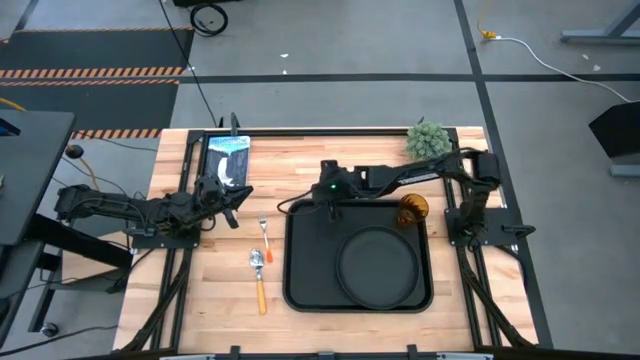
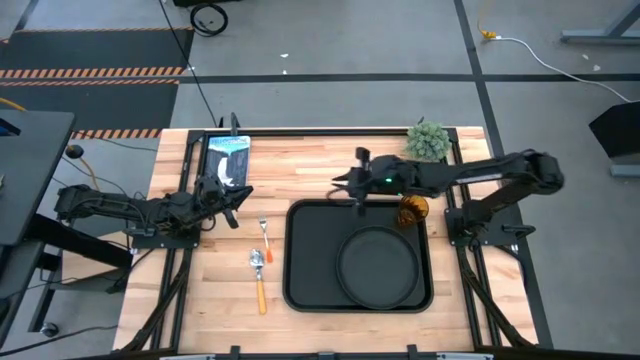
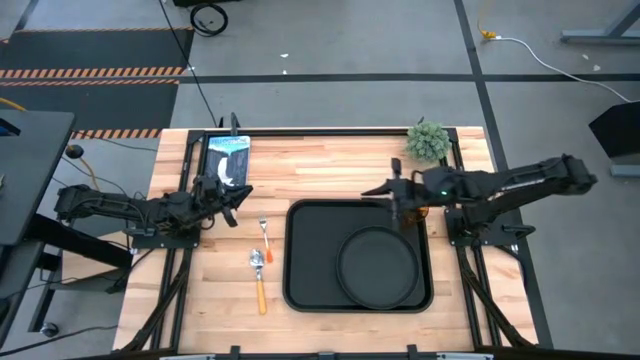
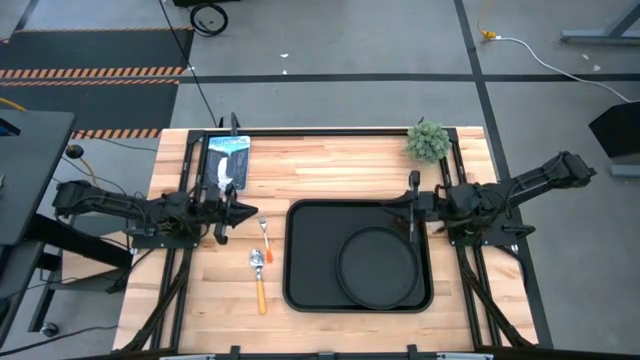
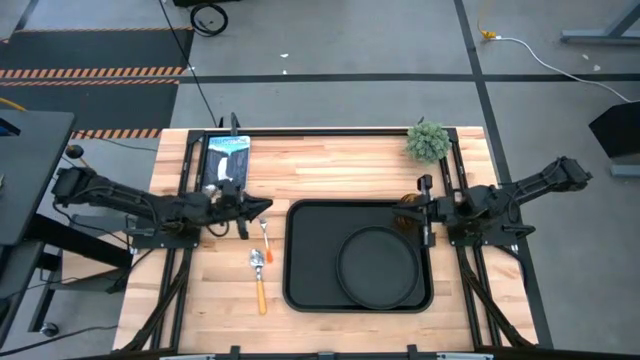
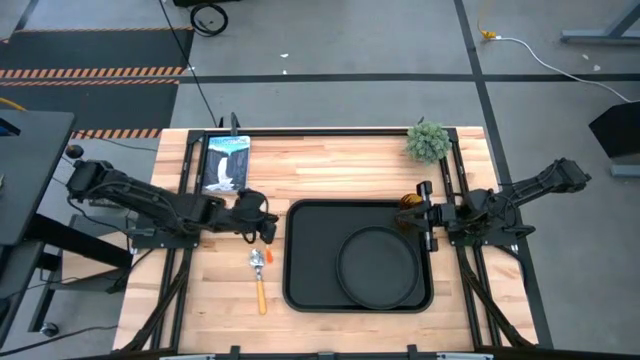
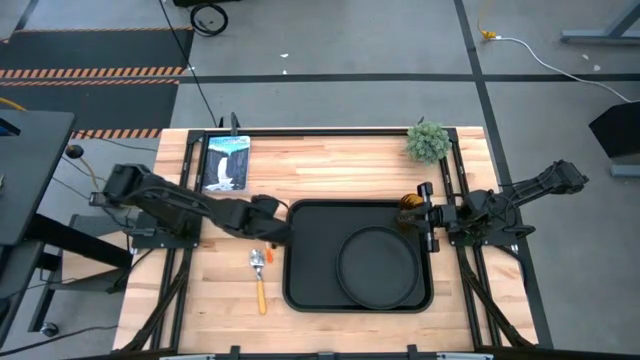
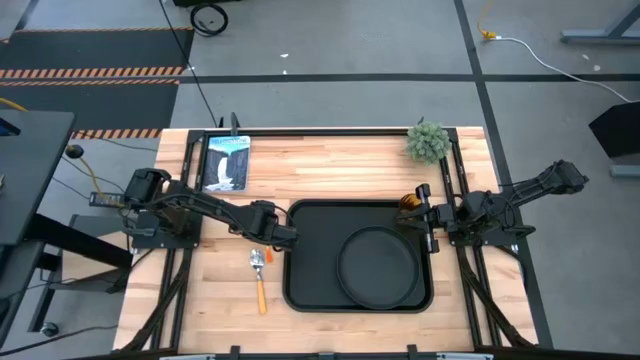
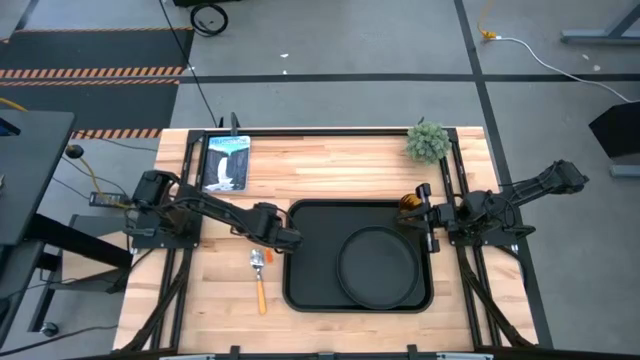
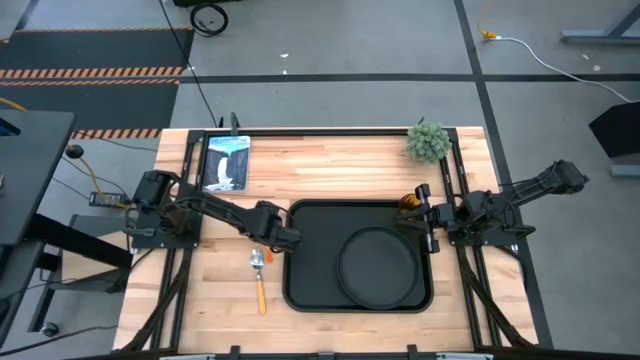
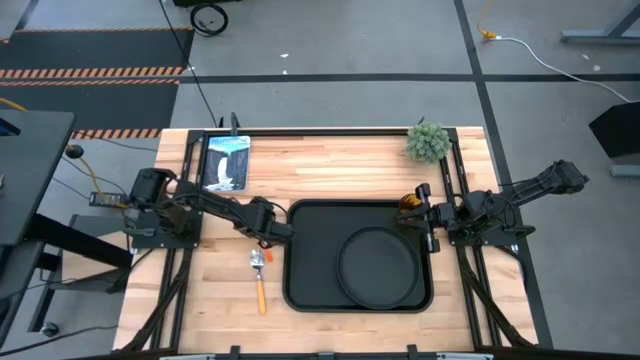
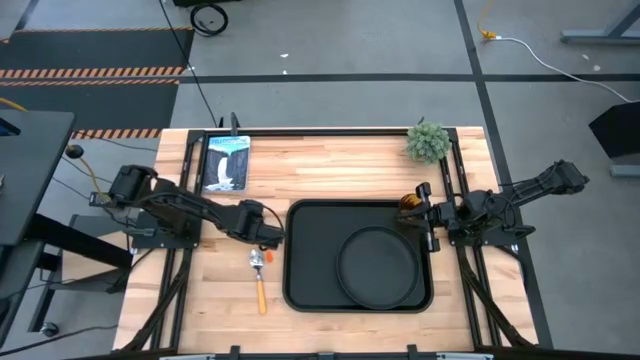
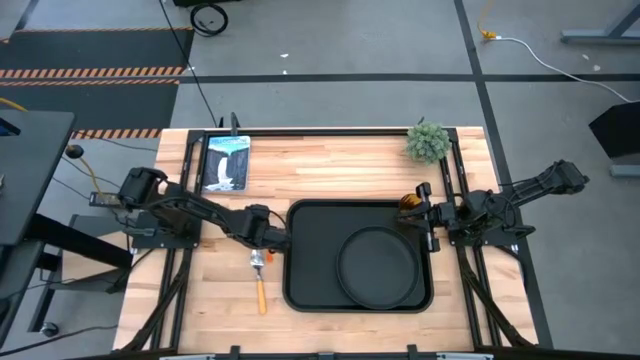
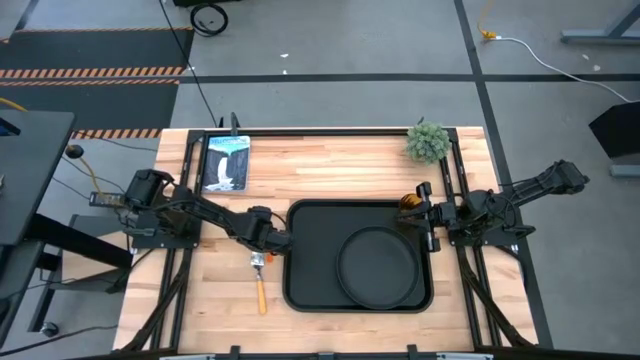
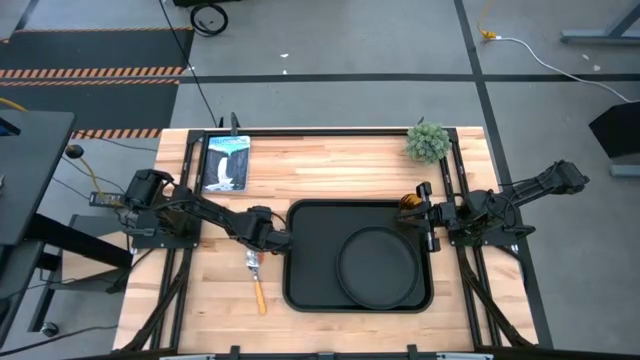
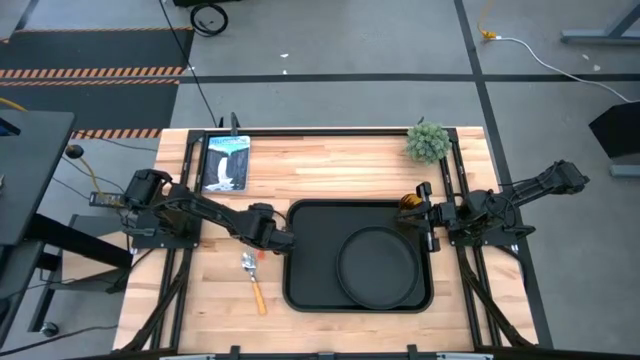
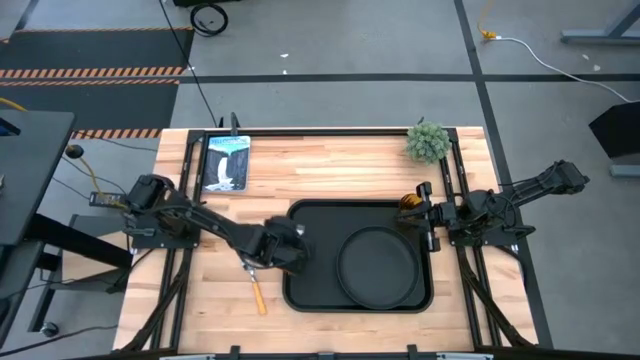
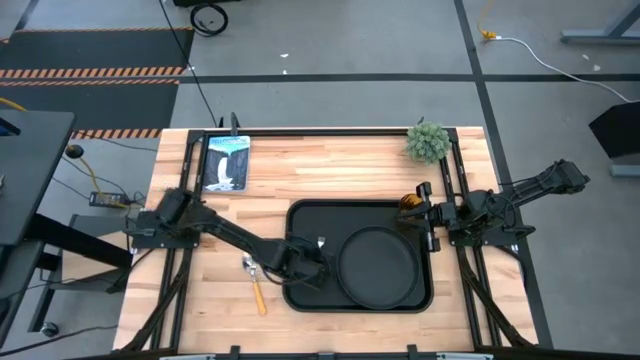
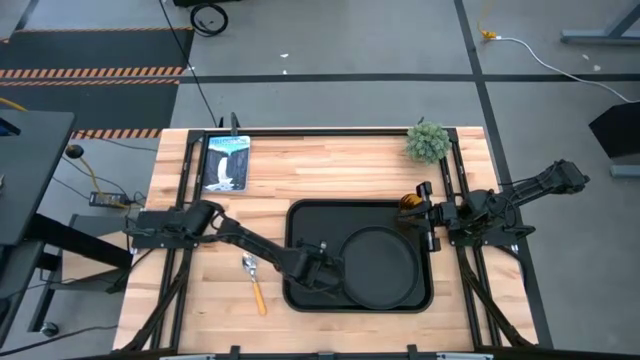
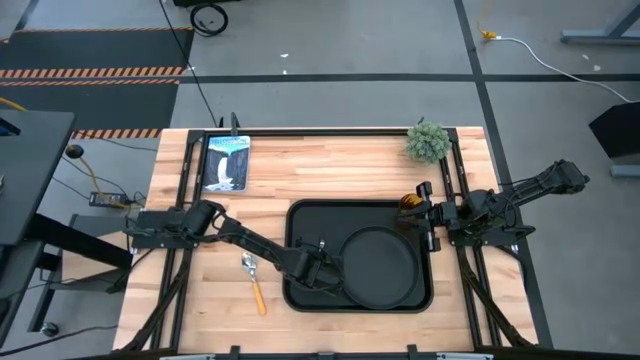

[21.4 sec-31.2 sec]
Task: Pick and place plate/cup/fork/spoon on tray
Put the orange fork to the left of the black plate on the black tray

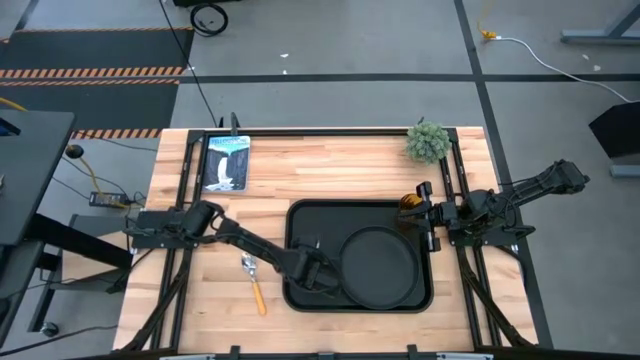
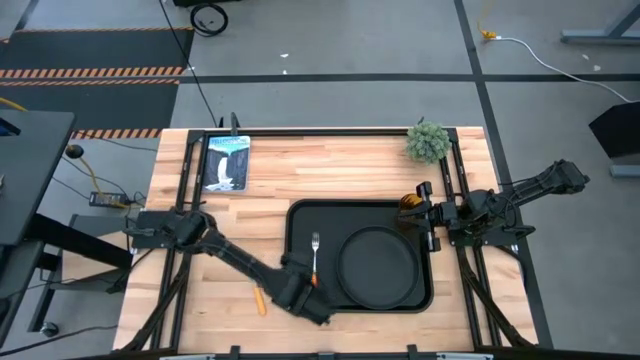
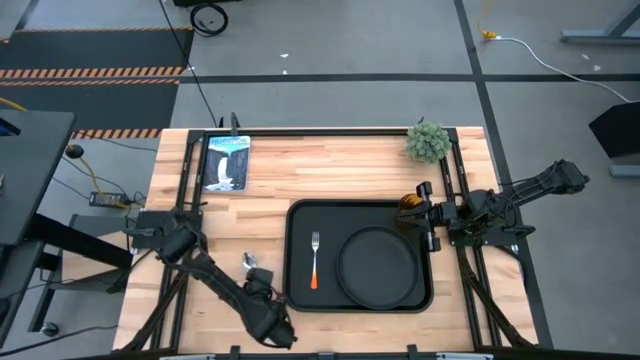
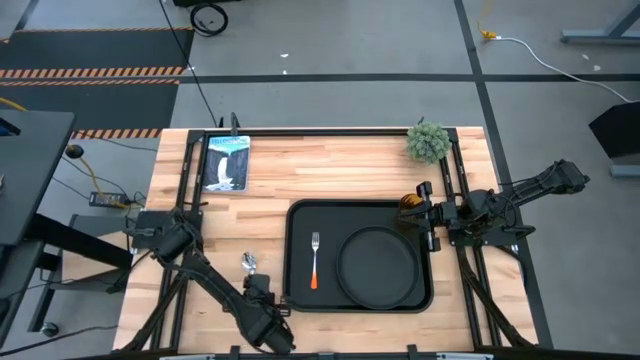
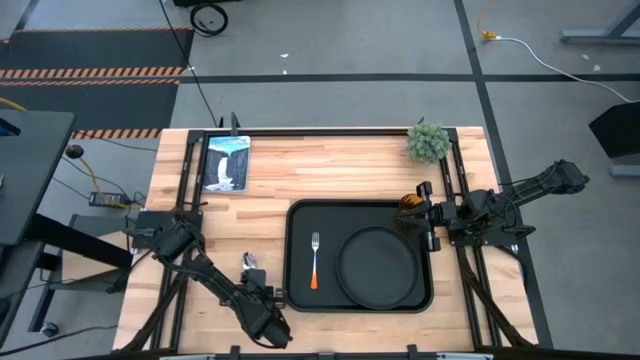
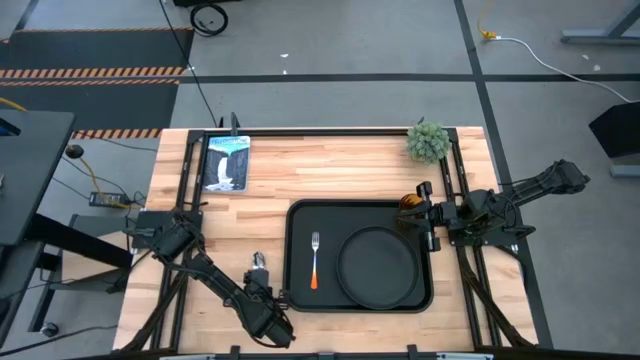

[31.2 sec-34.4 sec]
Put the yellow spoon to the left of the orange fork on the black tray

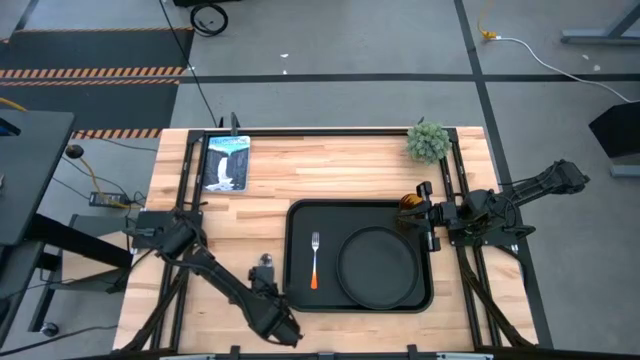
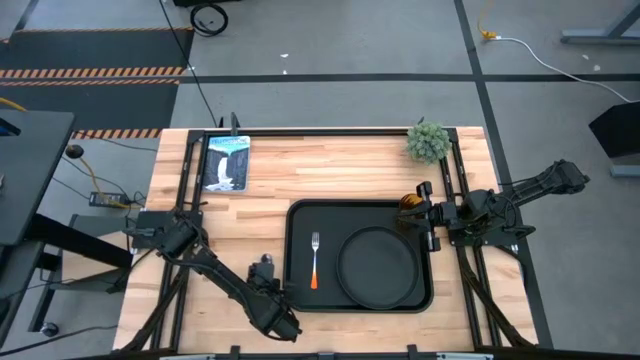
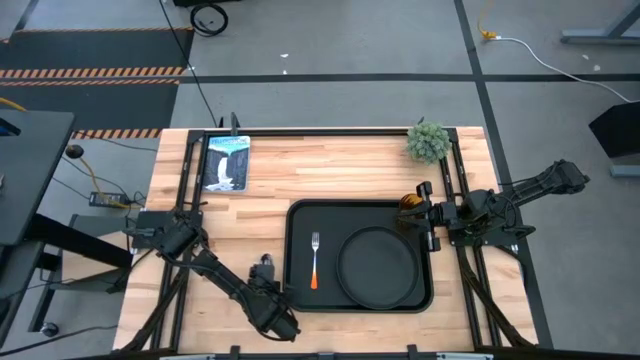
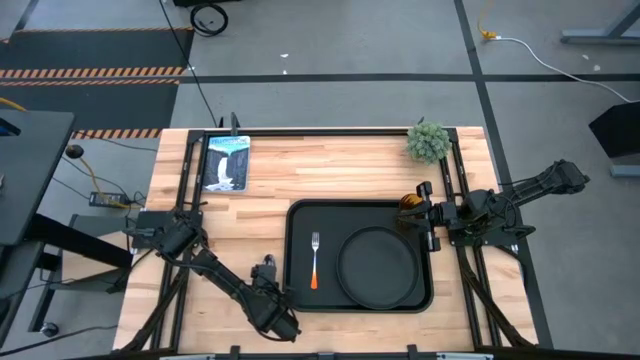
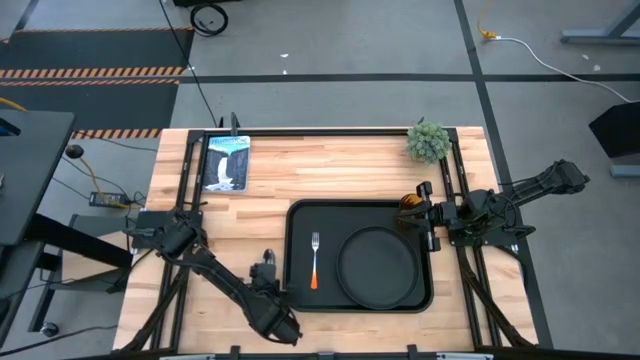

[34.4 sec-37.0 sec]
Put the yellow spoon to the left of the orange fork on the black tray

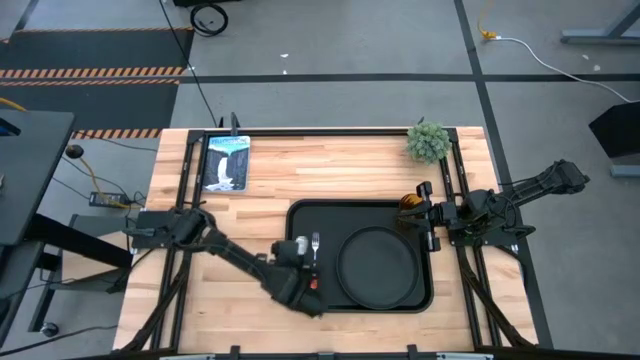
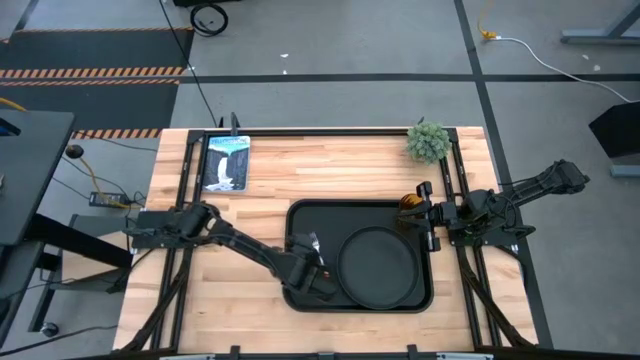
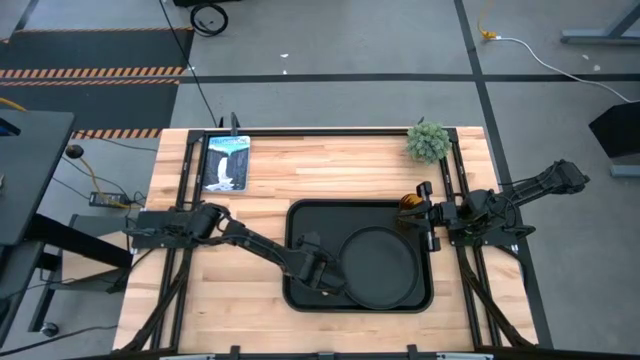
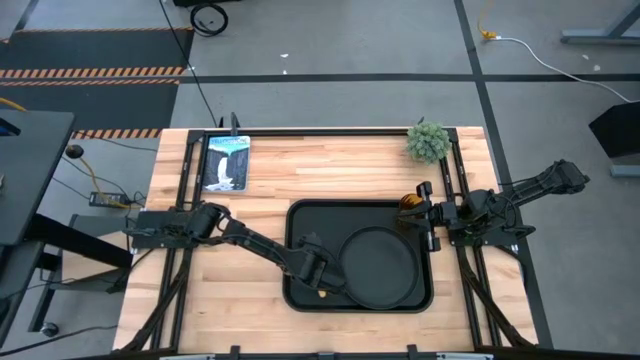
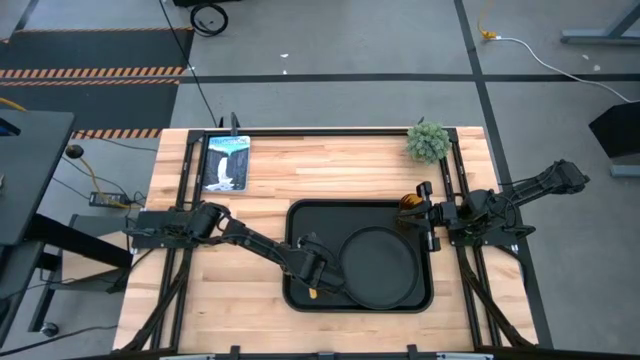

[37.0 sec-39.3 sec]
Adjust the yellow spoon on the black tray

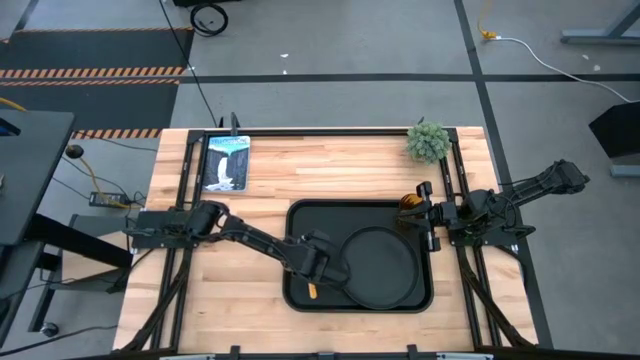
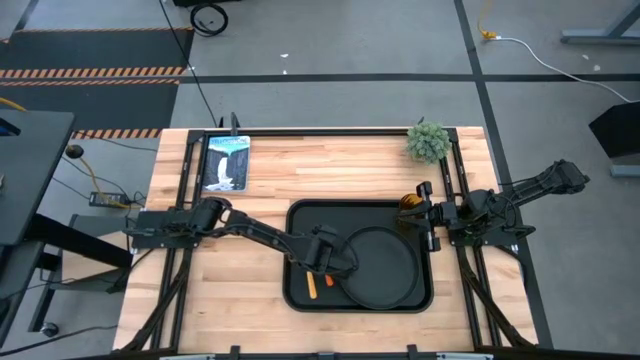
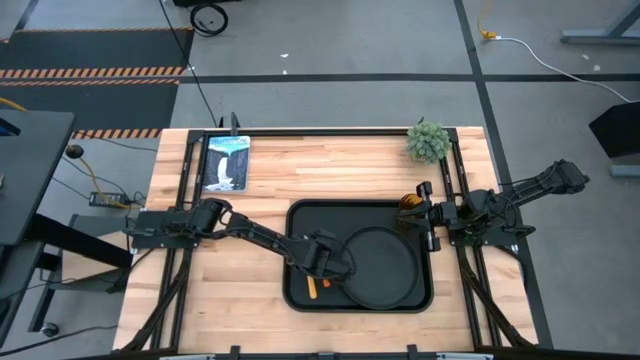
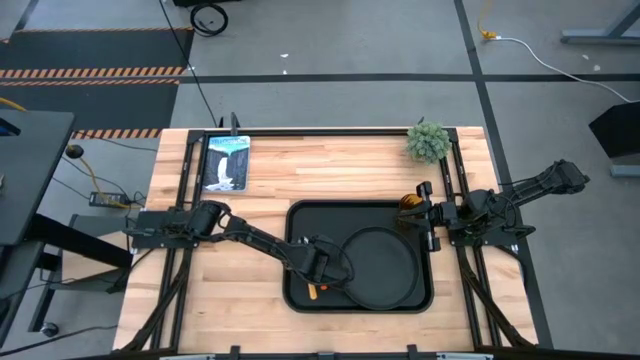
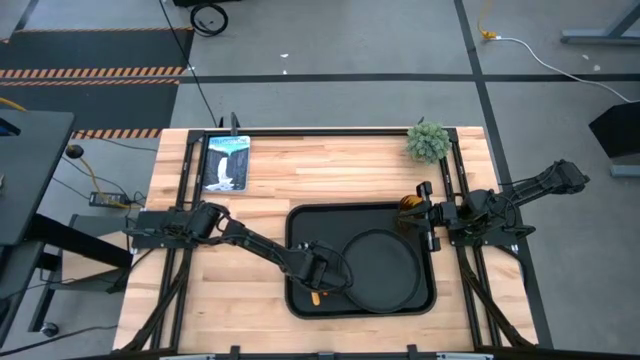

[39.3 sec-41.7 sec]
Adjust the orange fork on the black tray

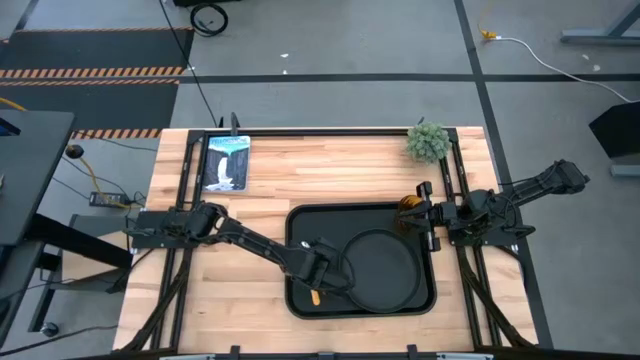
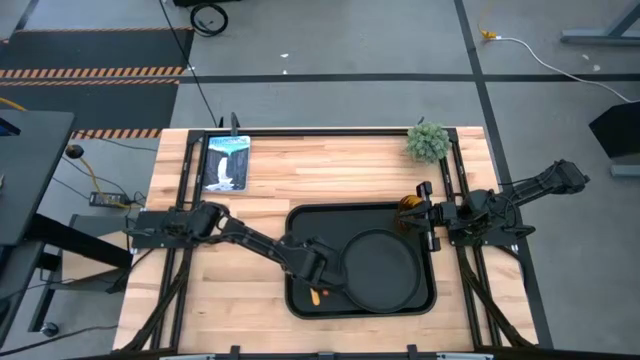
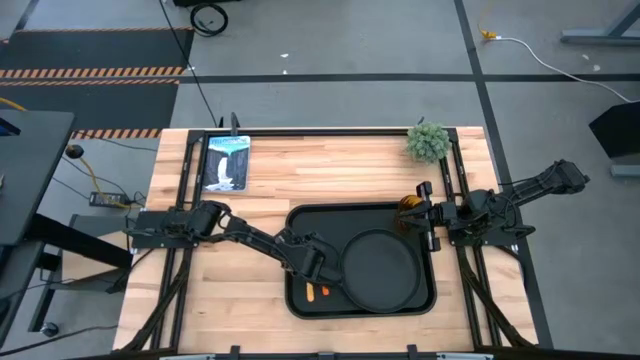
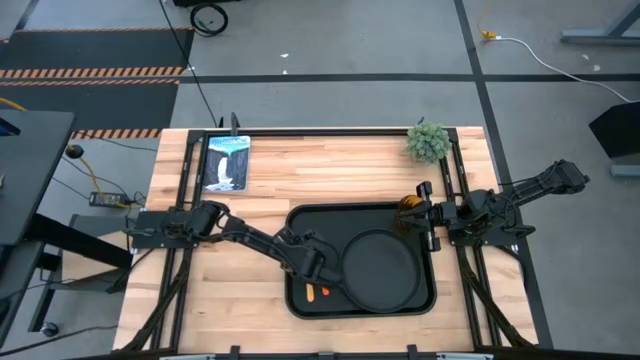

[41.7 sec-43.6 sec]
Adjust the yellow spoon on the black tray
